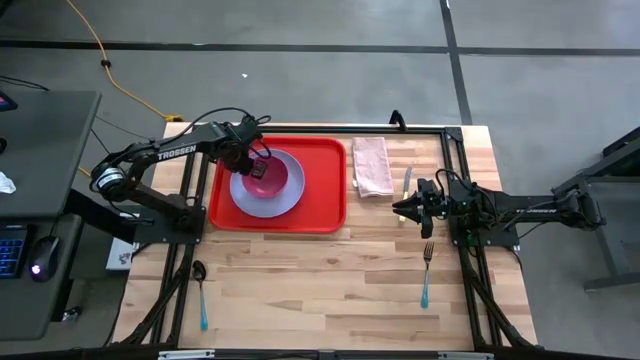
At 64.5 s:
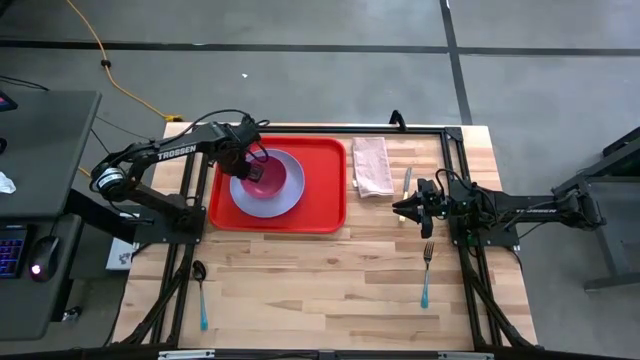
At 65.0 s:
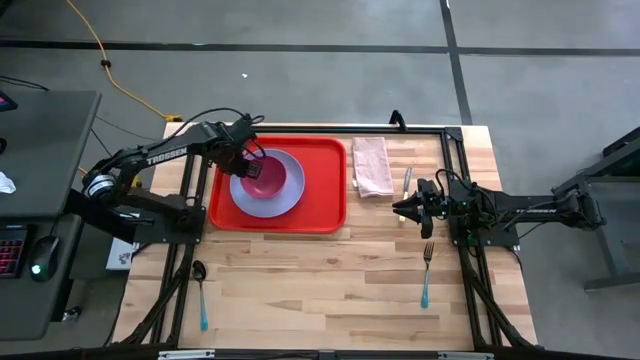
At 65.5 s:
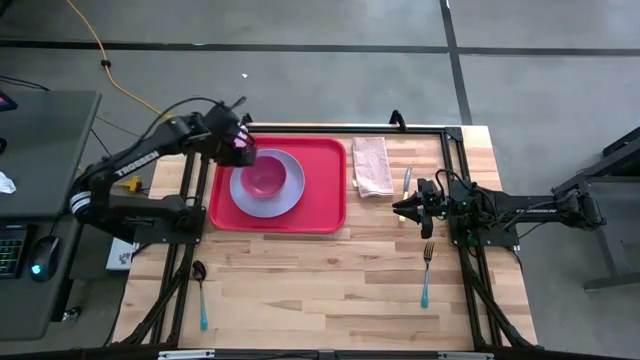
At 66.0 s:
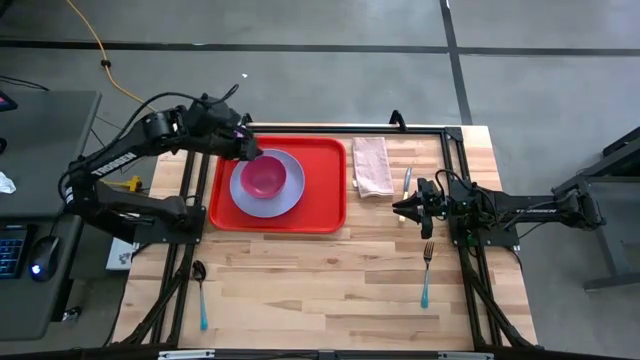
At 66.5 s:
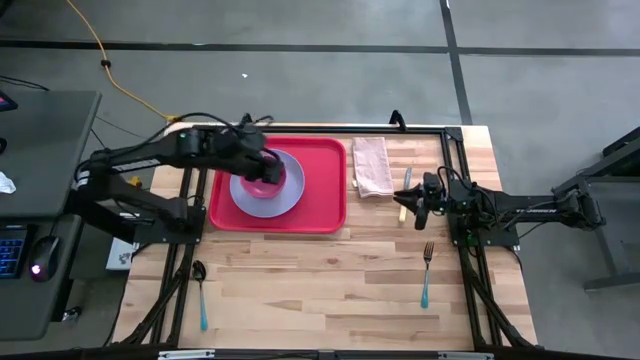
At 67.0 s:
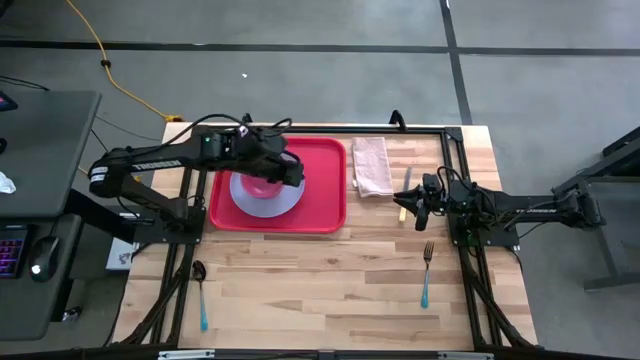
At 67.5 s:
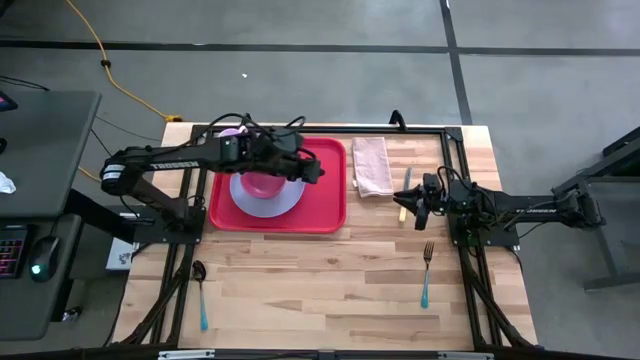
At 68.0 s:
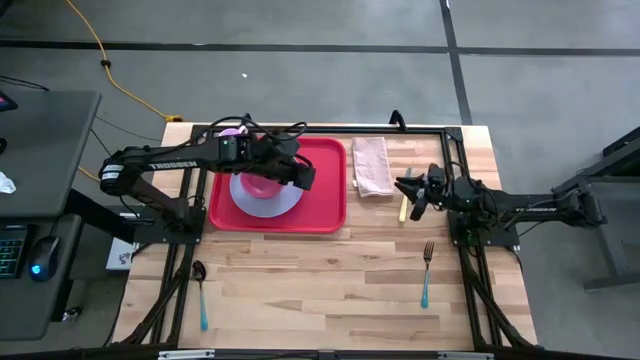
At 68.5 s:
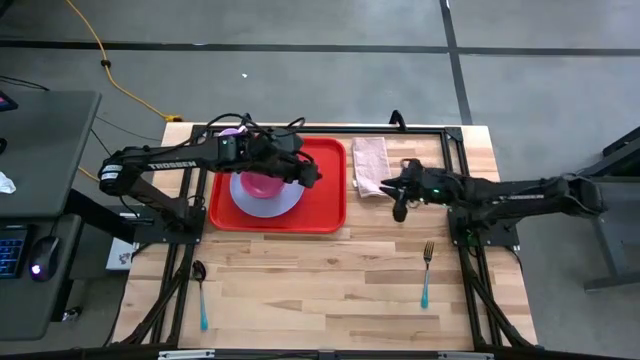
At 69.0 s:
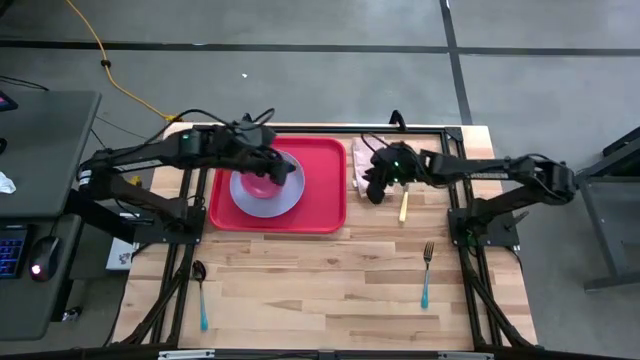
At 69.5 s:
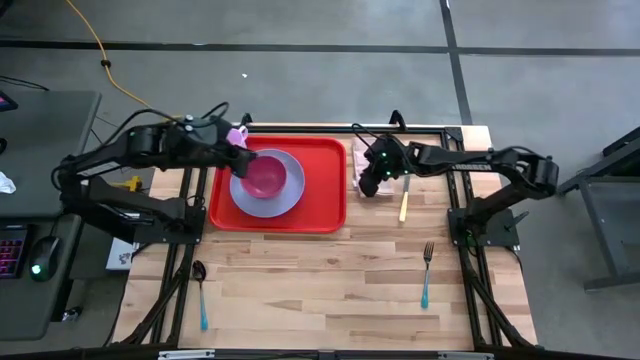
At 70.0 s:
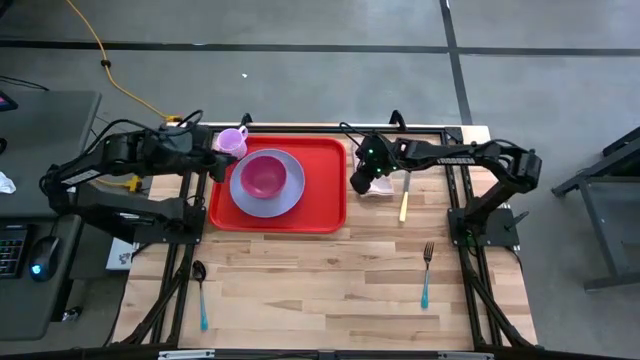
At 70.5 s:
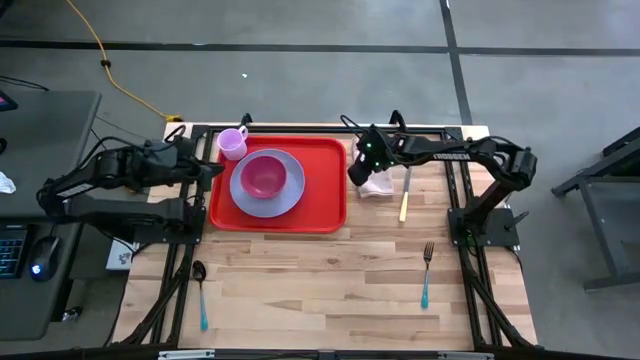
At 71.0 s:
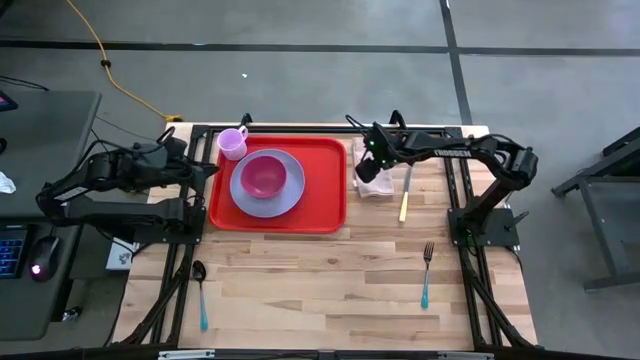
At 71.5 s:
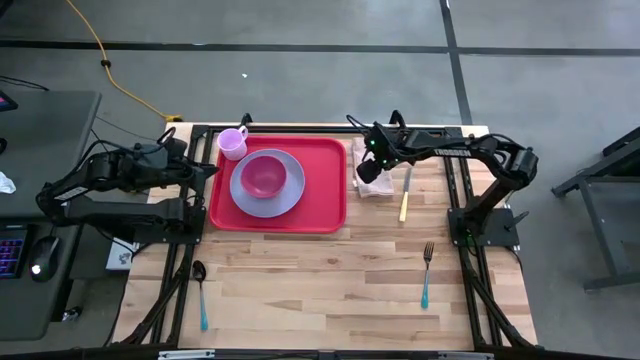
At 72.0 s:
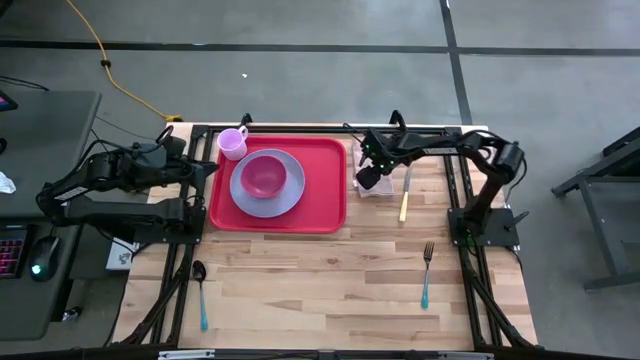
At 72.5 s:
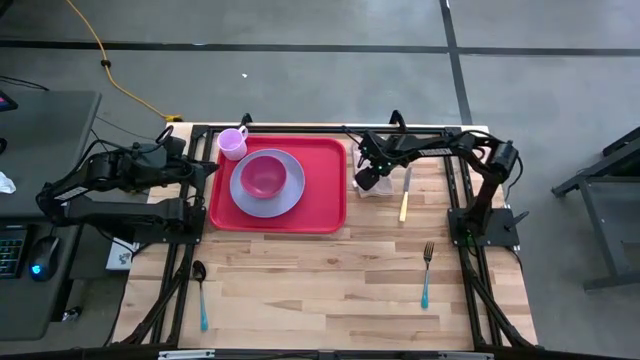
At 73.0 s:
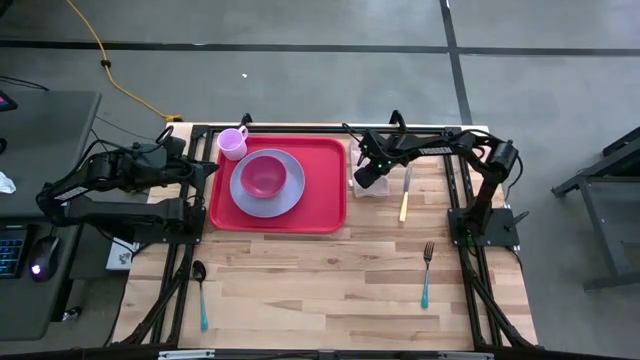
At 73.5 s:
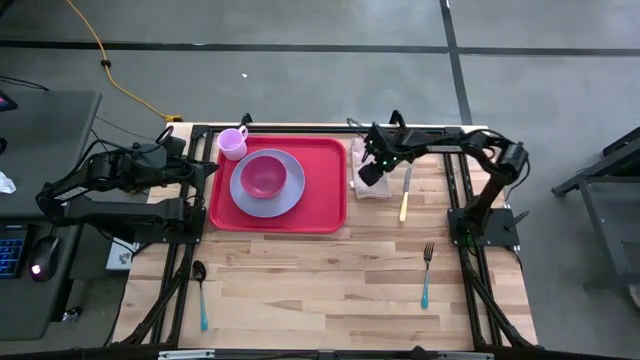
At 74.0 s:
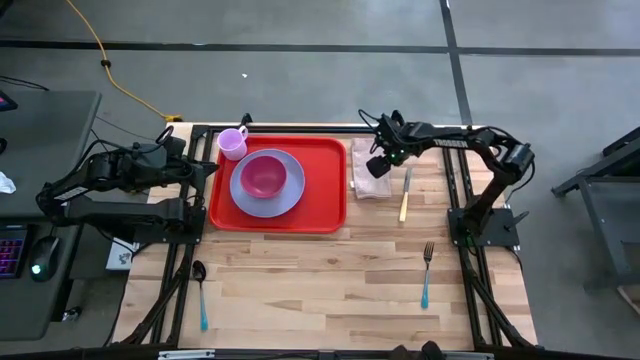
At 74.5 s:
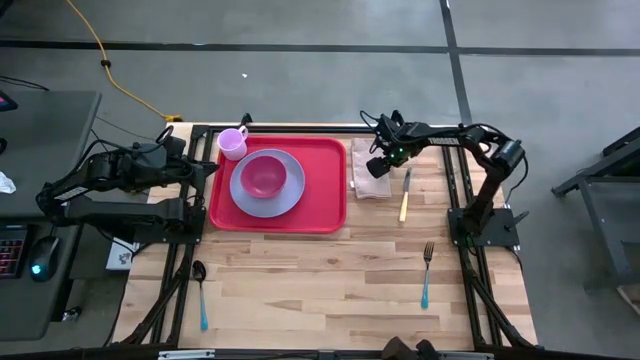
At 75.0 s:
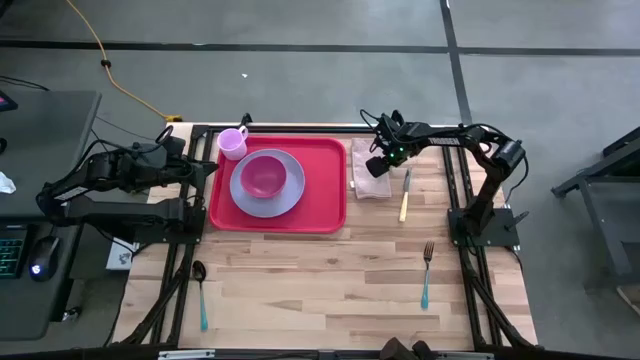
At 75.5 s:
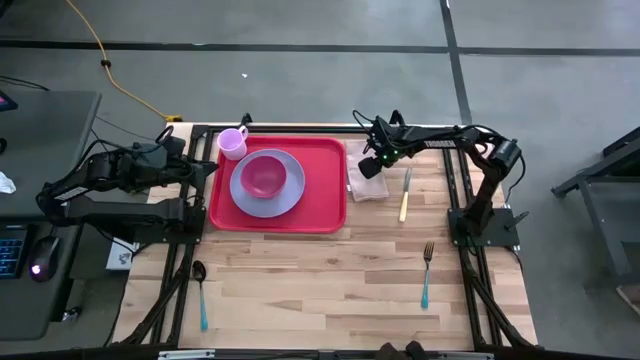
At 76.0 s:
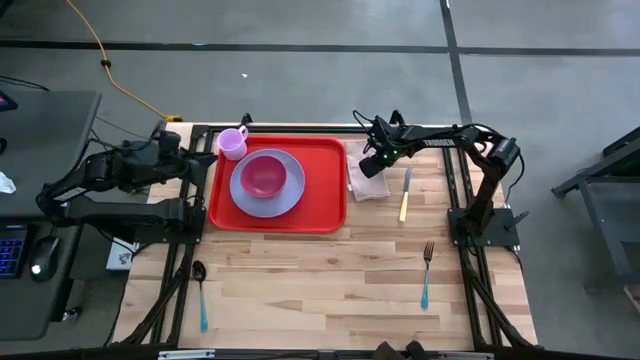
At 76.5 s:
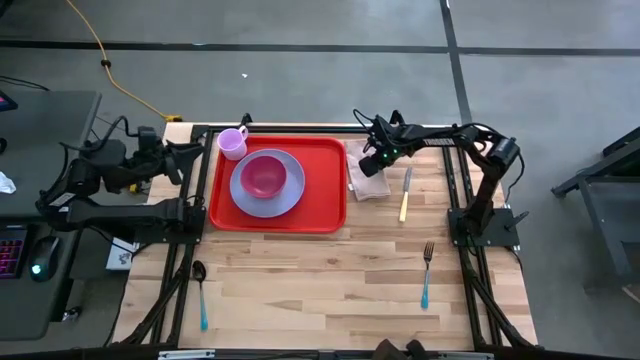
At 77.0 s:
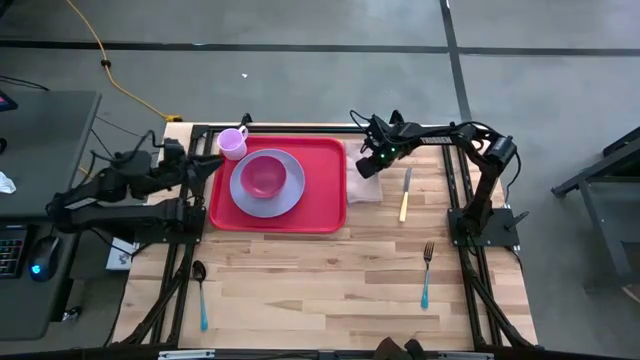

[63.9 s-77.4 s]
Task: Set up tray
Put the white table napkin on the red serving tray to the right of the purple plate

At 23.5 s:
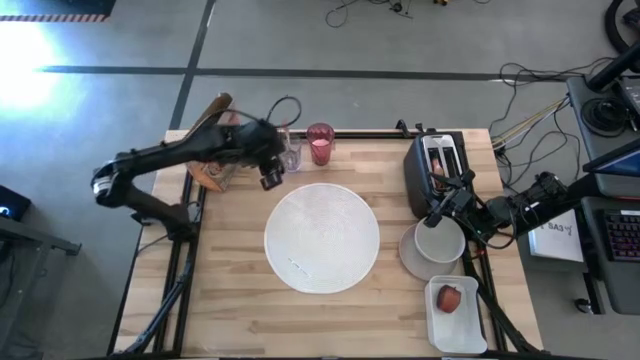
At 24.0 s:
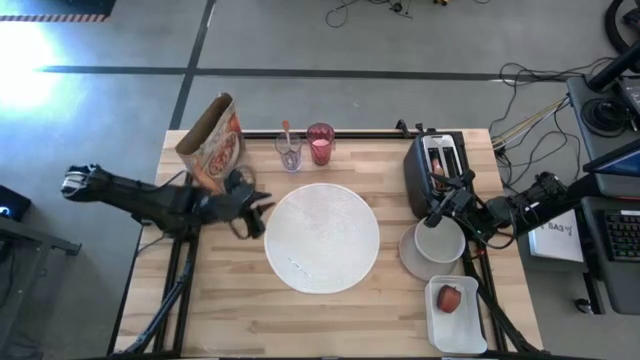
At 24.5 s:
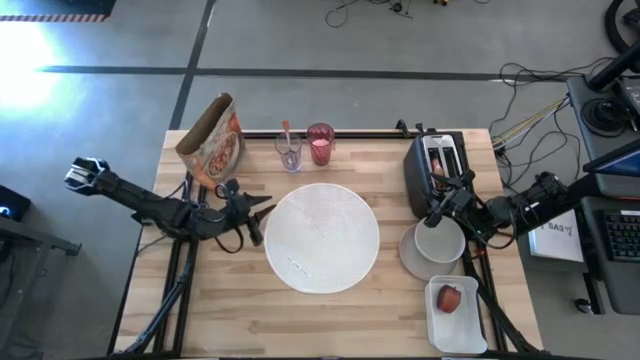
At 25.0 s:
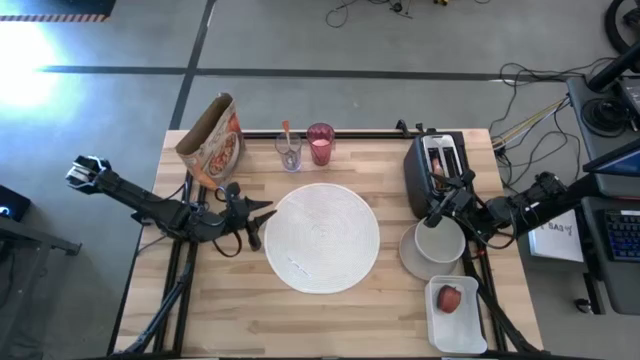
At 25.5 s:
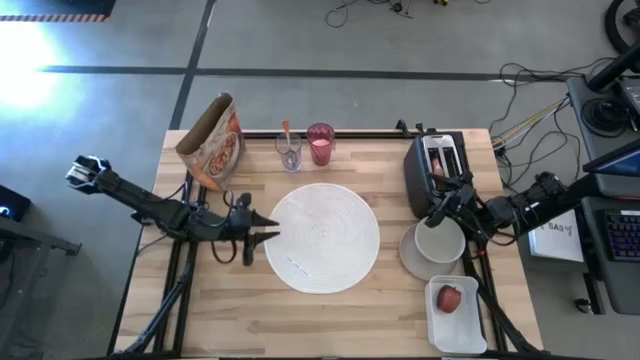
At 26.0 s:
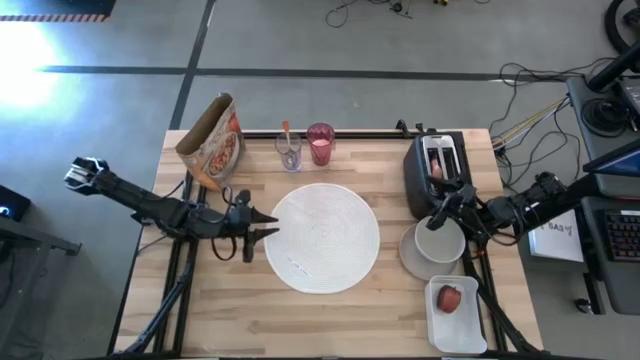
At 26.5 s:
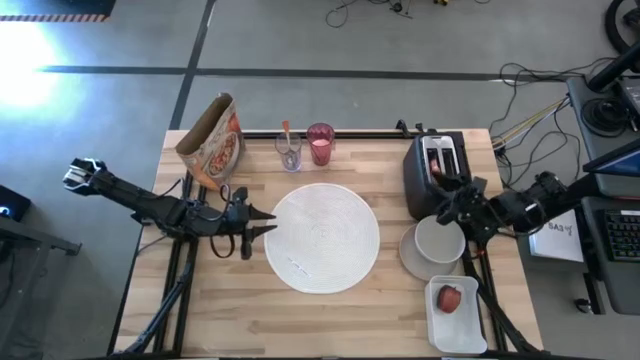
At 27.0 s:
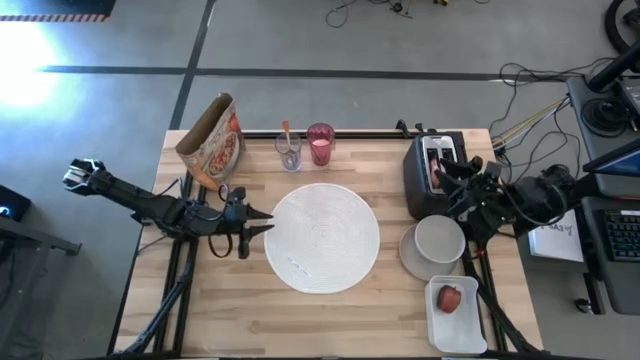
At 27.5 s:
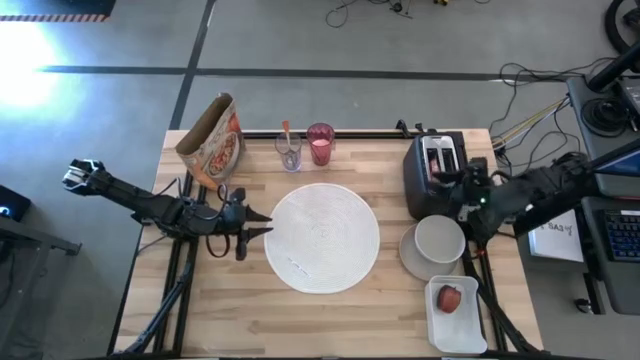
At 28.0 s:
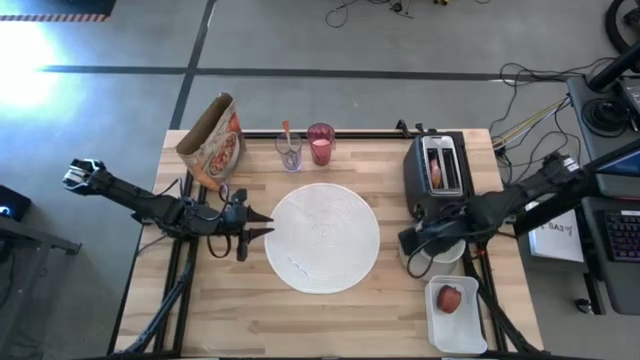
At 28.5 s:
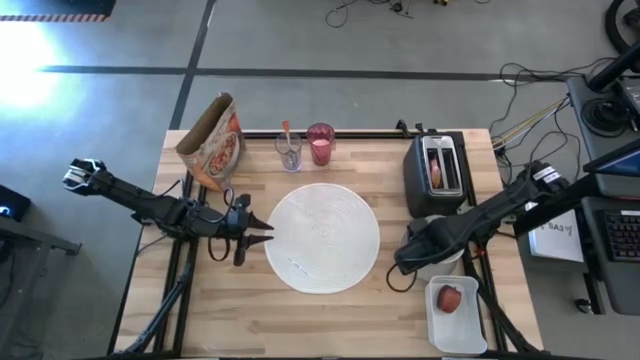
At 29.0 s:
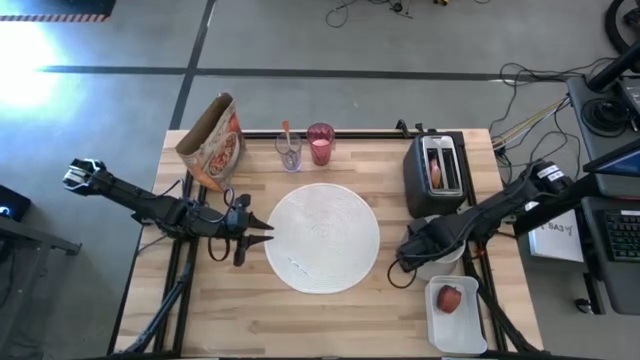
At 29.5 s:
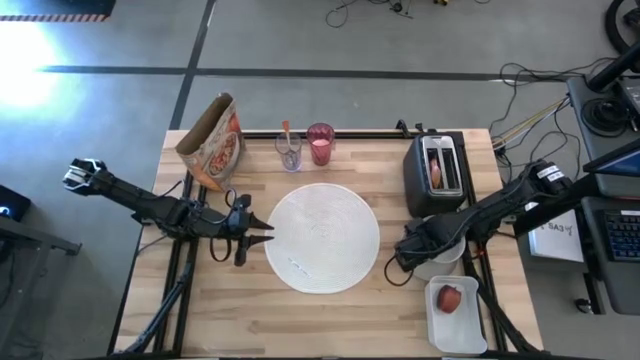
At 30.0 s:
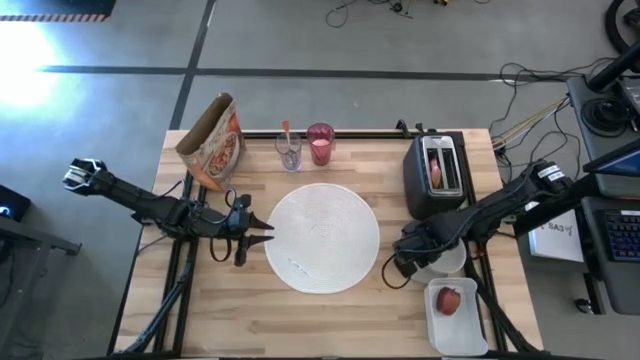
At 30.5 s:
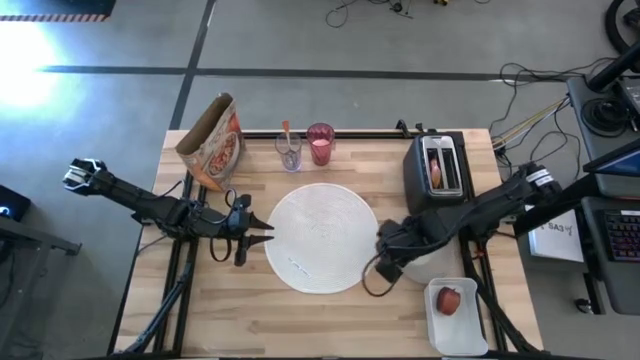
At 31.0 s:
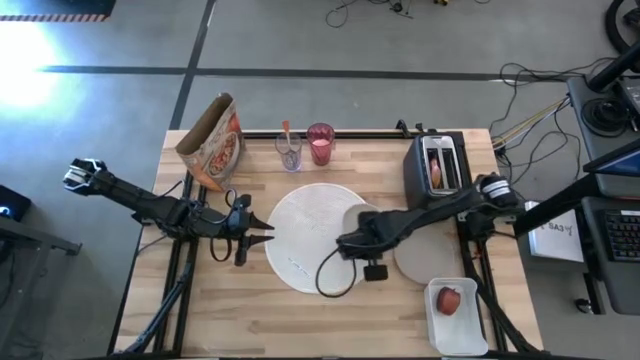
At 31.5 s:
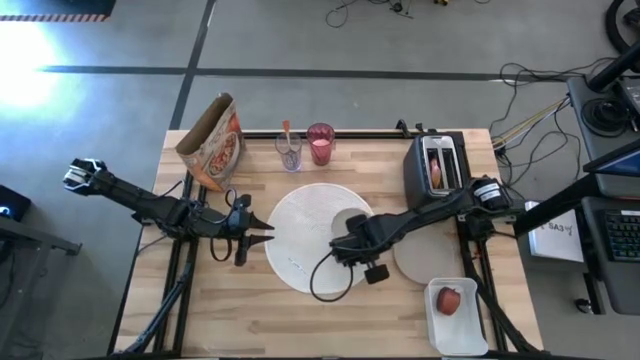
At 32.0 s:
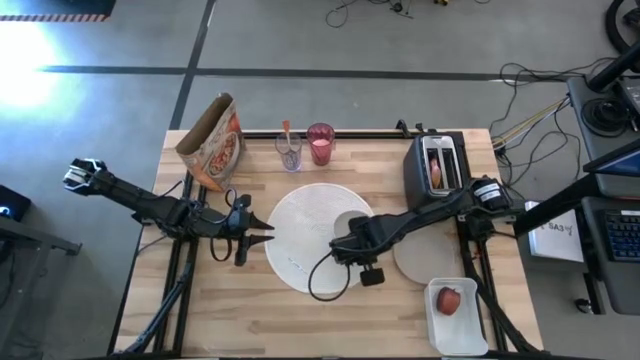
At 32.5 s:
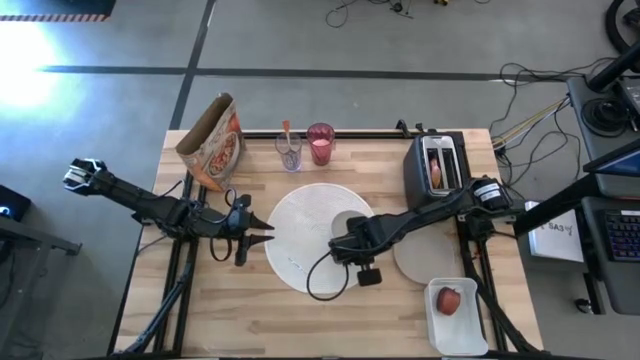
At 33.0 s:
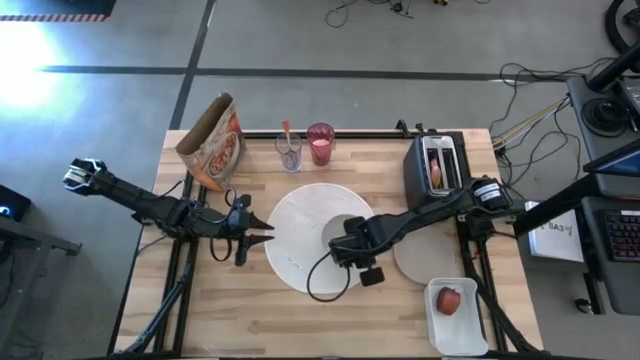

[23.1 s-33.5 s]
Task: Arrange a breakfast setting
Put the white bowl on the white table mat
